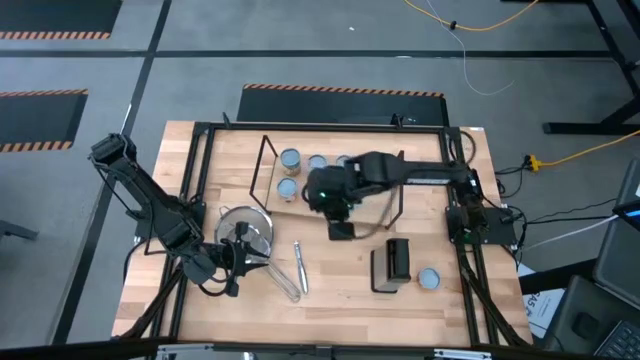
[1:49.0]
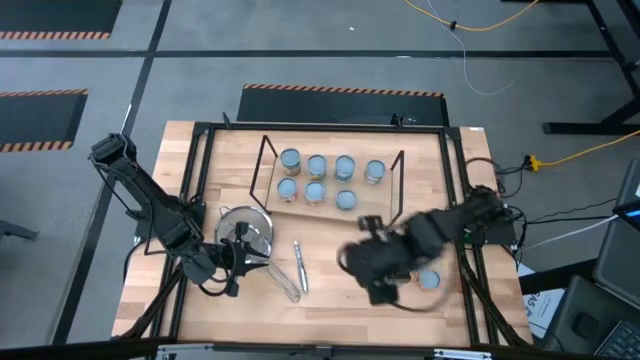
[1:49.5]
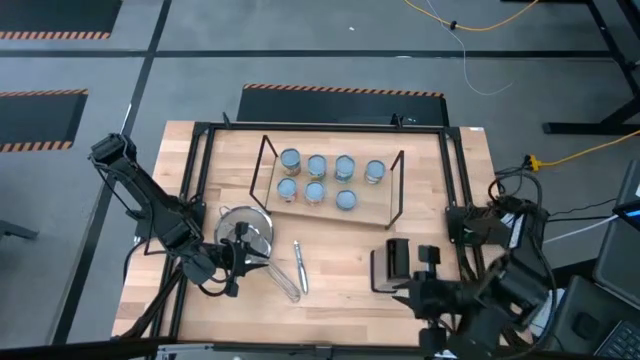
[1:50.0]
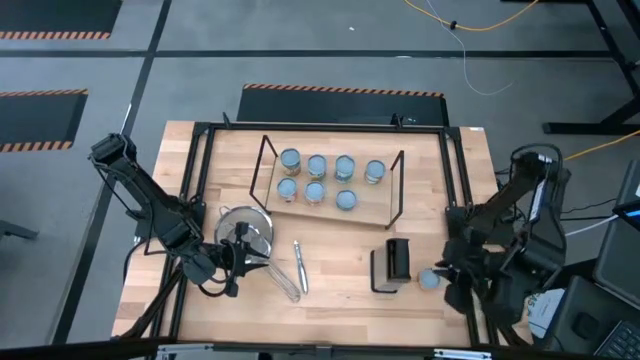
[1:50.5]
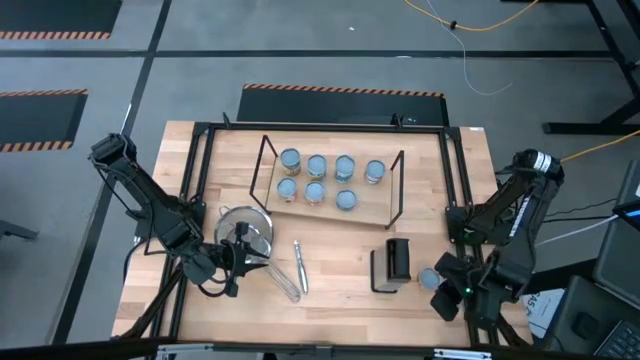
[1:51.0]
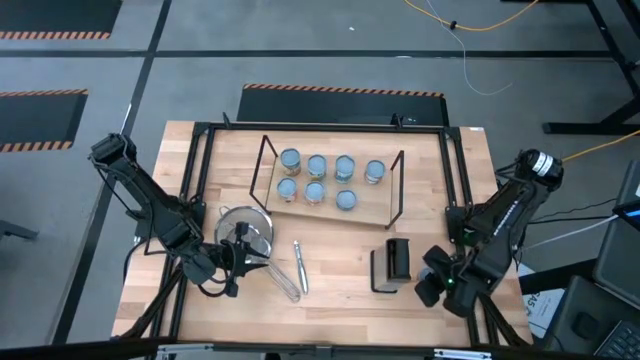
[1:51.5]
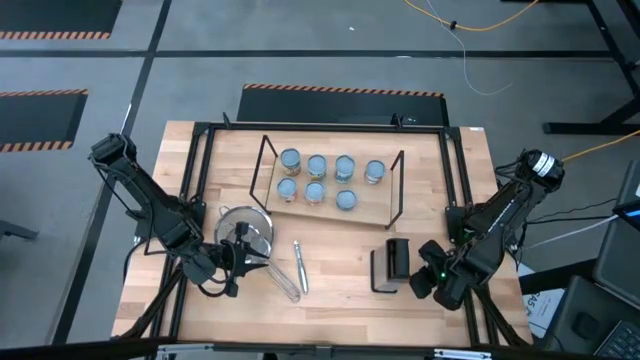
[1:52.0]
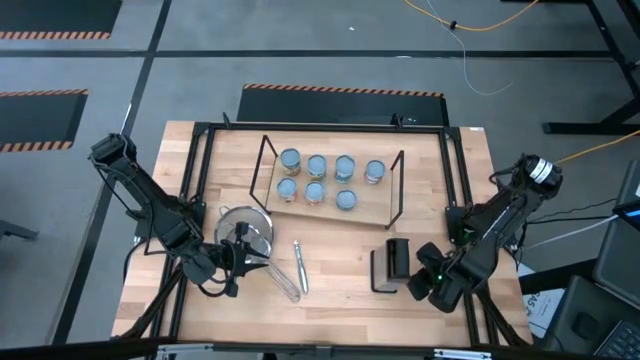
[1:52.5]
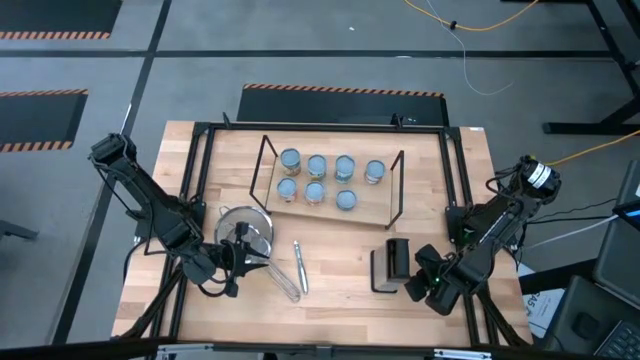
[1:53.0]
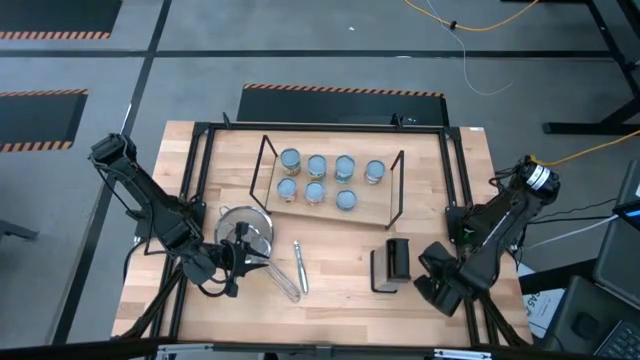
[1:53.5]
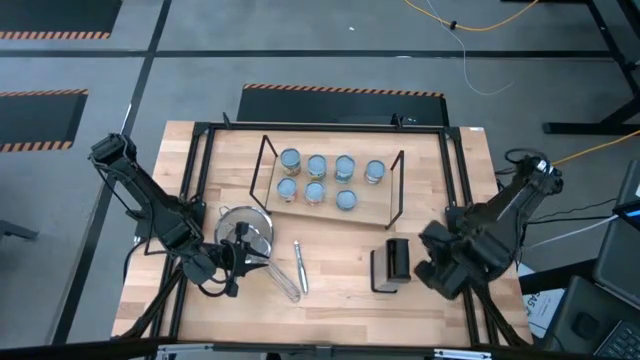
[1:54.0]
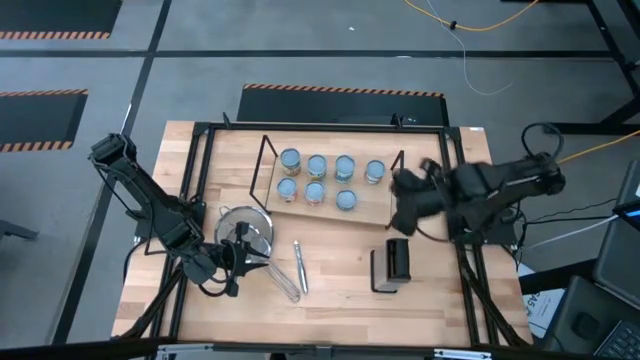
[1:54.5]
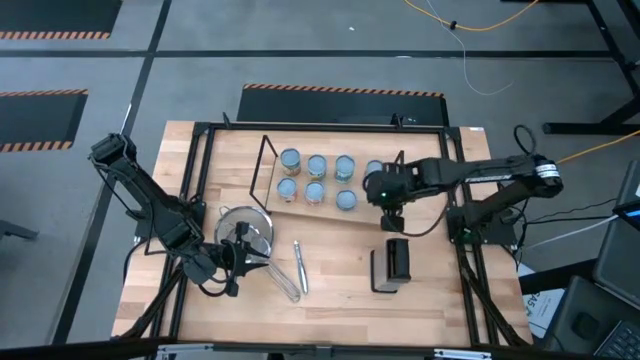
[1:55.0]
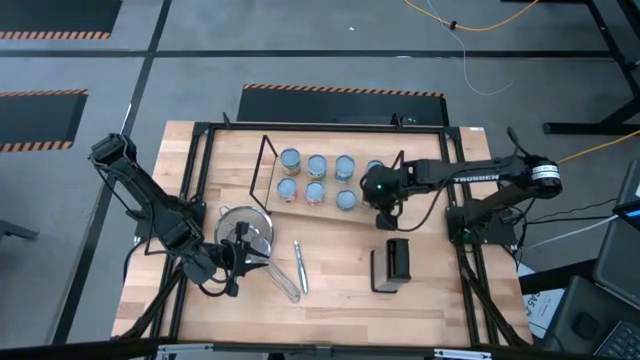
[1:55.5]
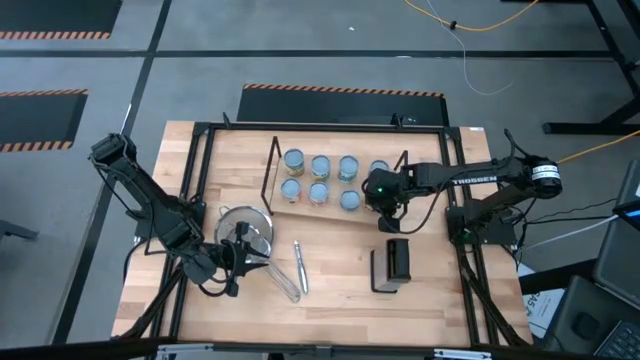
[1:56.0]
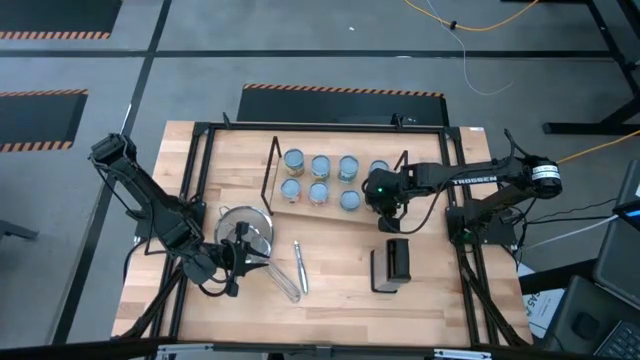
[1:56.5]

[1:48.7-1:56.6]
Task: Pick and place cans onto a shelf
Put the yellow can on the shelf aligned with the other green can

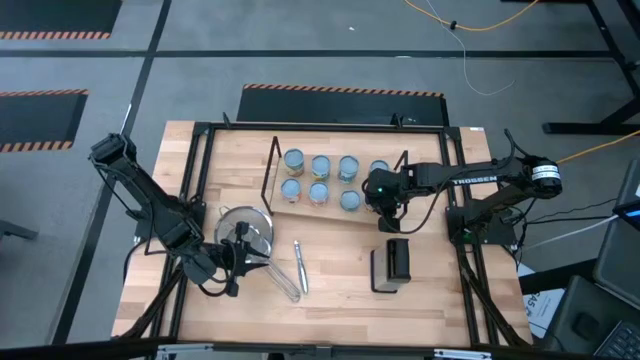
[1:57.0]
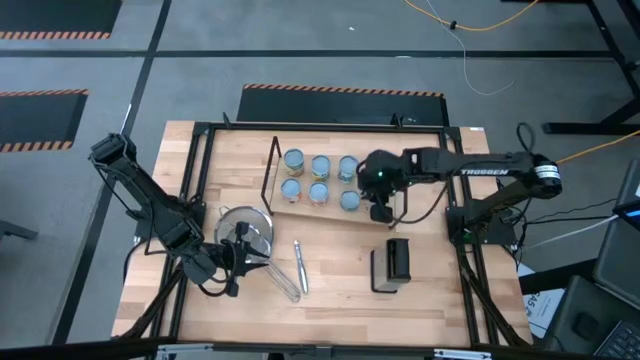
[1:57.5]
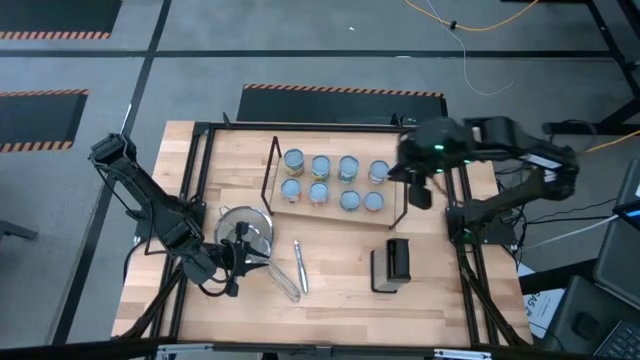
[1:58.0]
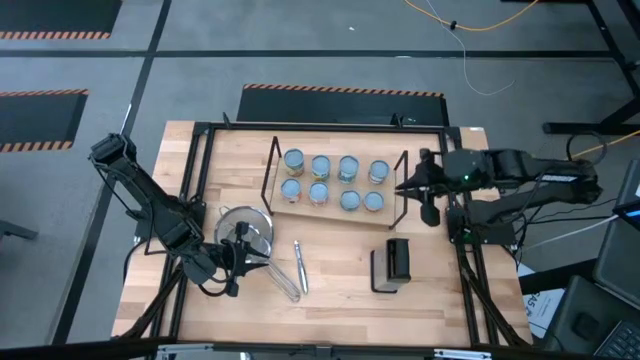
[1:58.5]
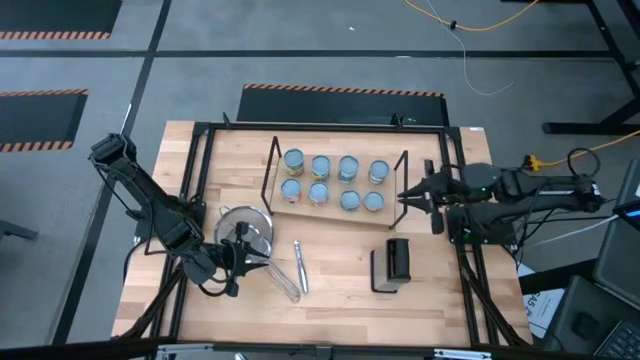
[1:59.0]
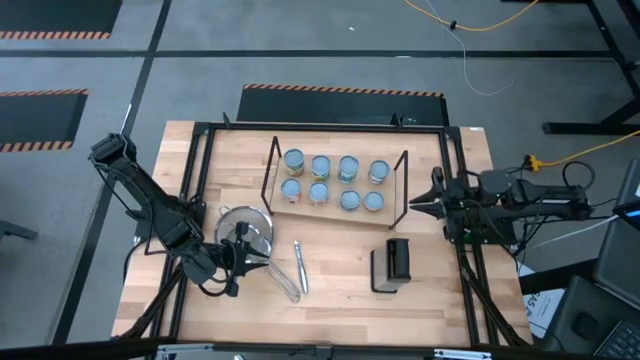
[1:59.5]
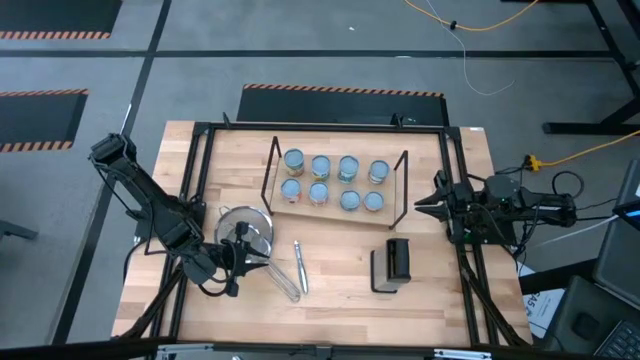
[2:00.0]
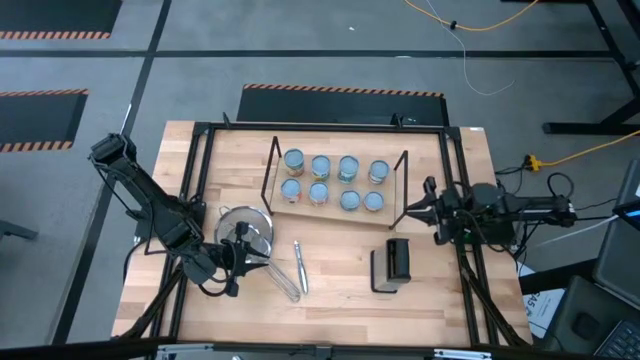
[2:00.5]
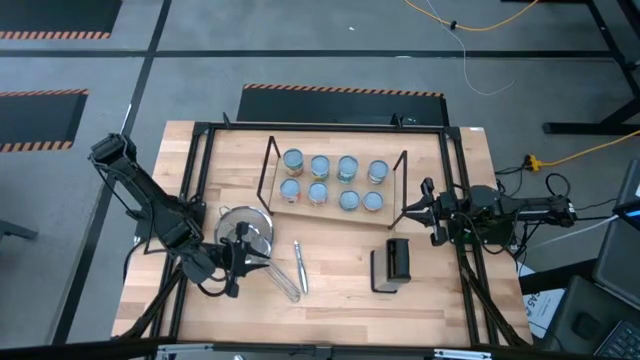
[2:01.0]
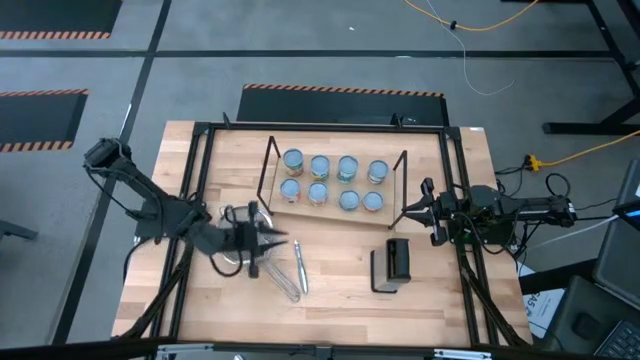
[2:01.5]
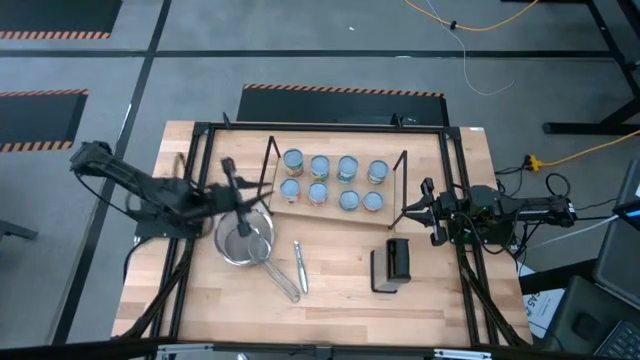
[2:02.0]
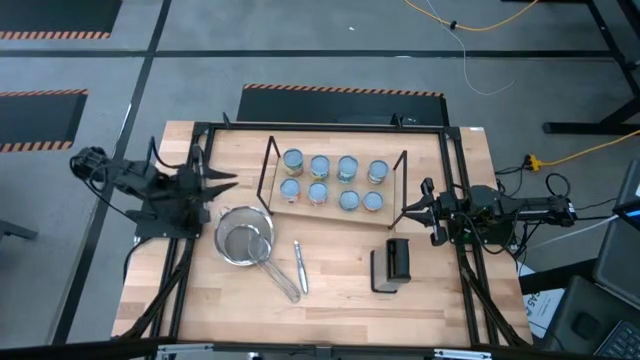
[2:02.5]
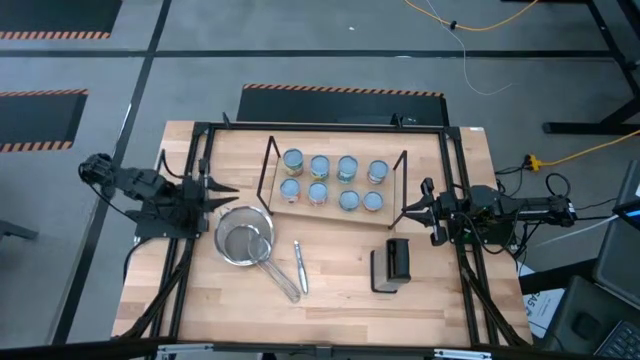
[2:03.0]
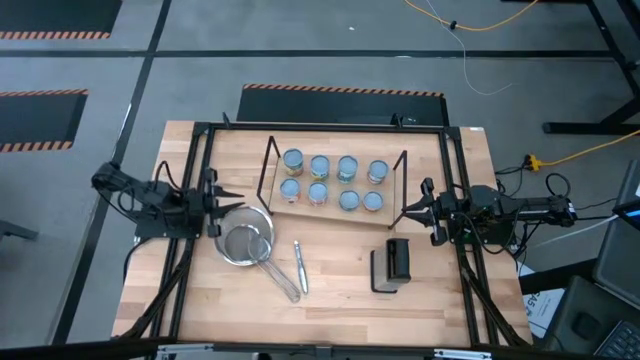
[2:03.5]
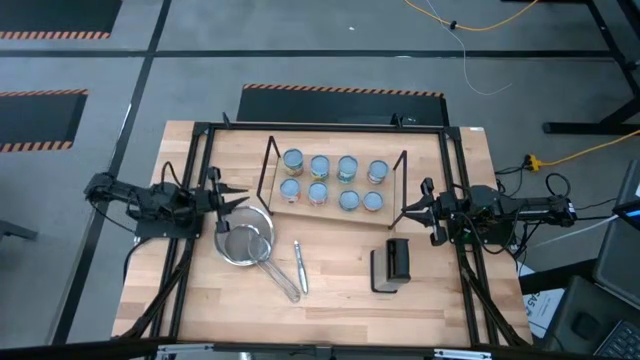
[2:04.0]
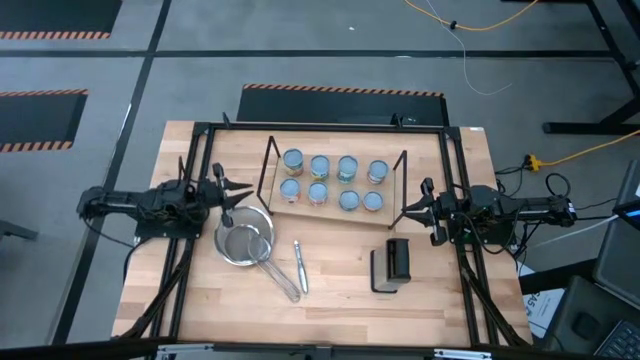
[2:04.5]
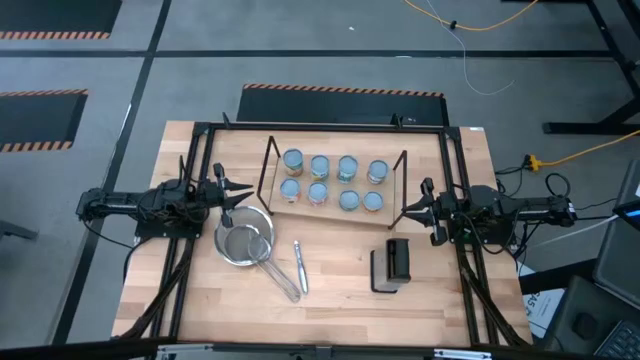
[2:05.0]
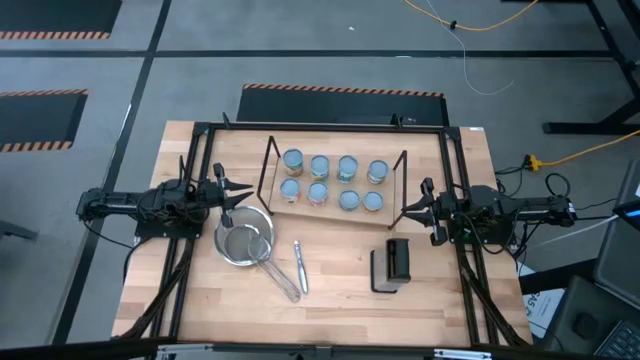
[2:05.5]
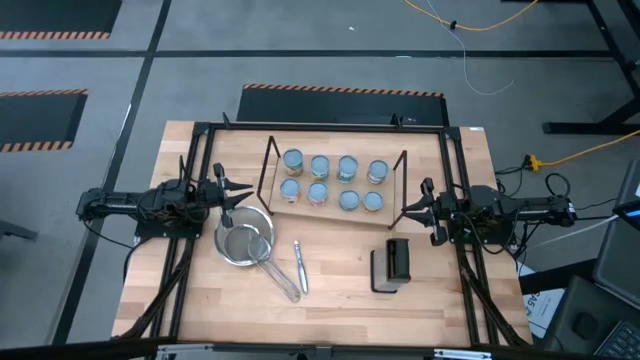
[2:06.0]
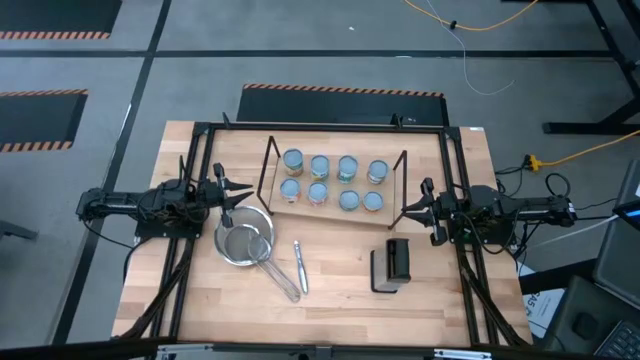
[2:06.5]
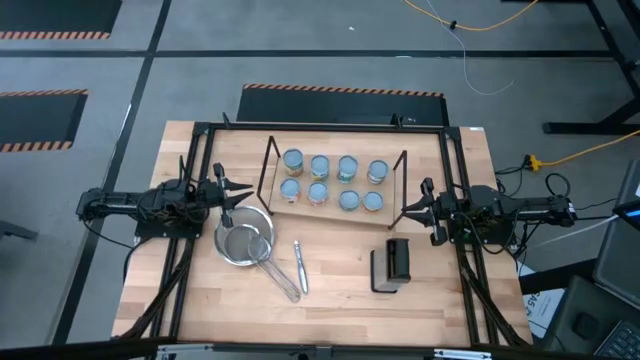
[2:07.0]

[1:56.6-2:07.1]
Return to Home Position

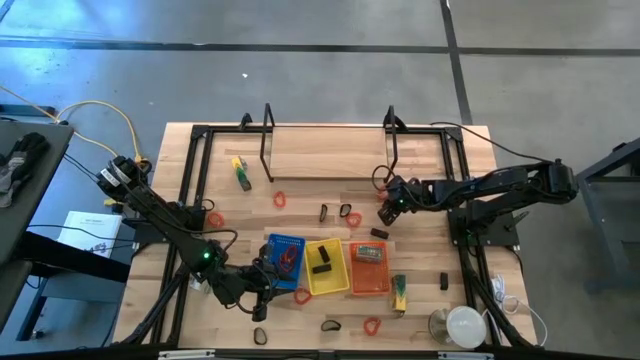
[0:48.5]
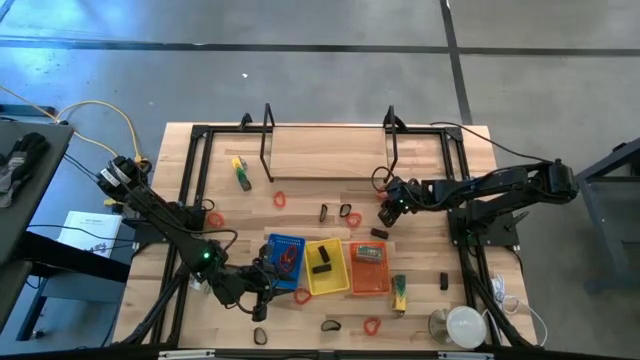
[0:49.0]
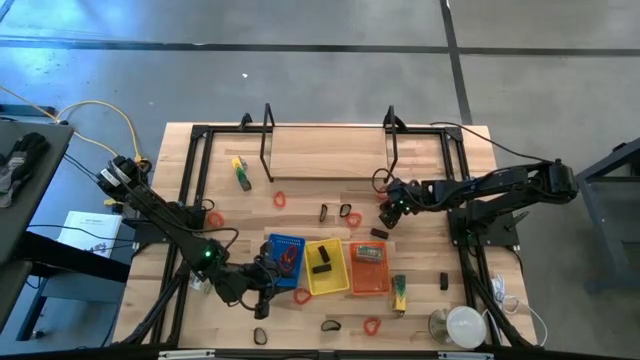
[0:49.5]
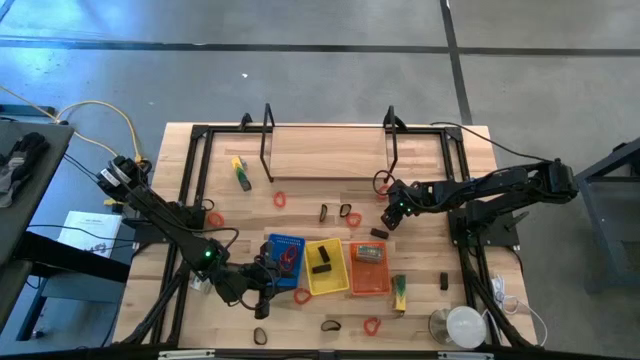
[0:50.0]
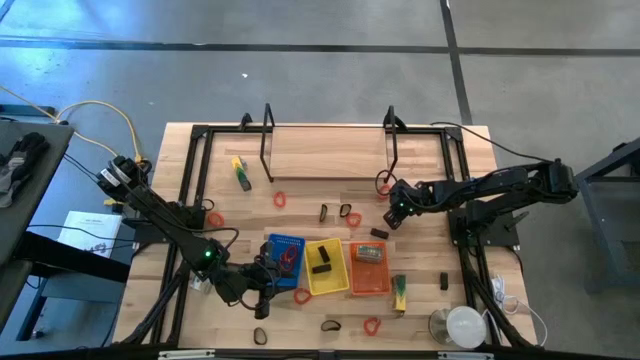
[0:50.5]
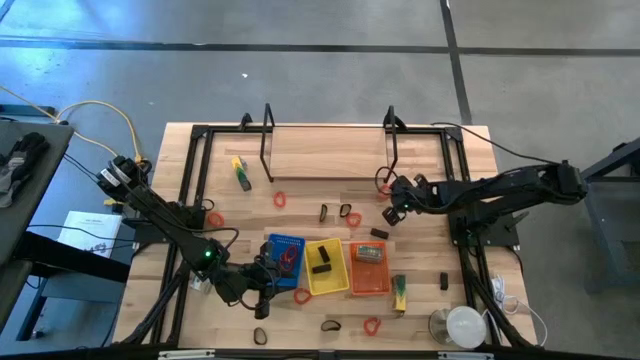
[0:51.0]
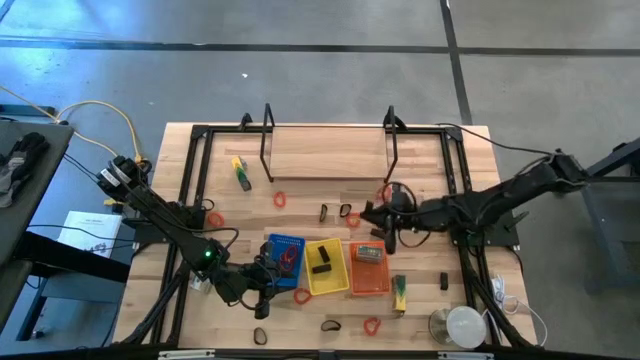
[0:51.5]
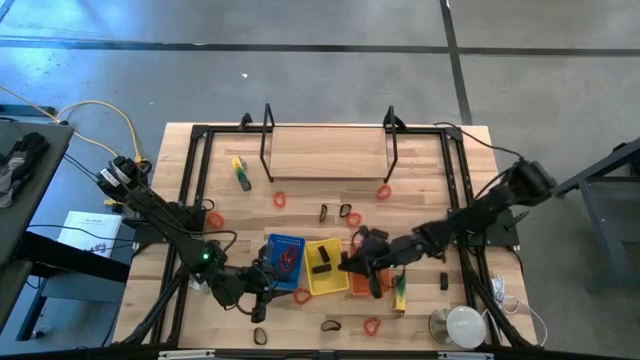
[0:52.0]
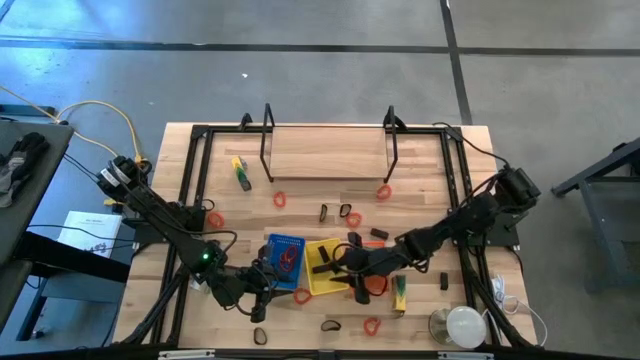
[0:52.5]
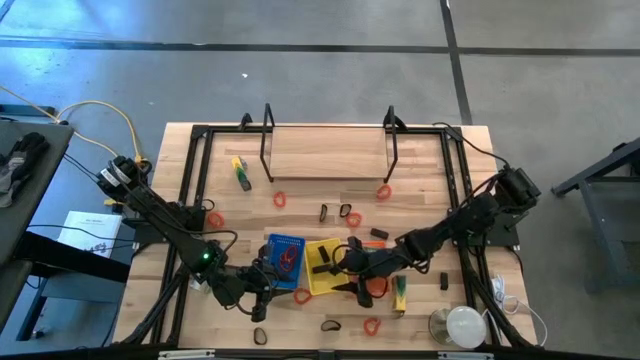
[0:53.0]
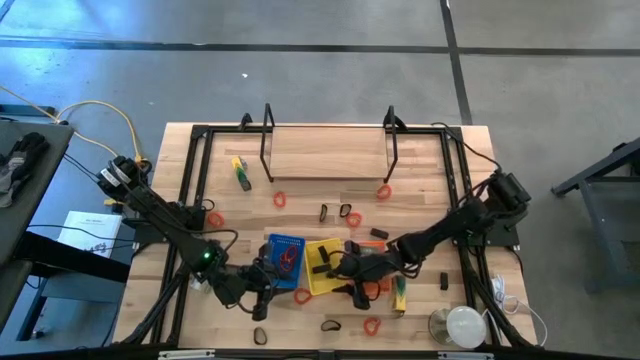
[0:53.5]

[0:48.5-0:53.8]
Task: Pick & Place Office Desk Supplies
Put the black rubber band into the yellow basket
